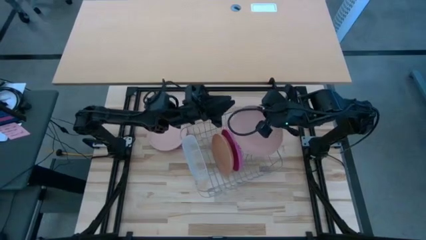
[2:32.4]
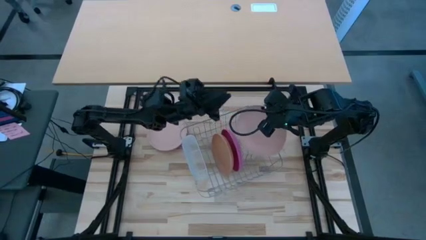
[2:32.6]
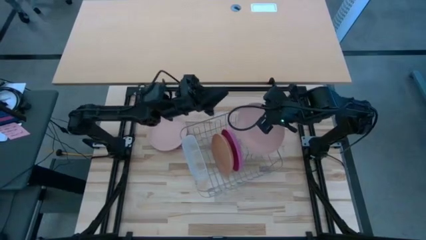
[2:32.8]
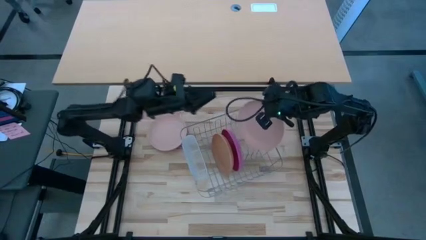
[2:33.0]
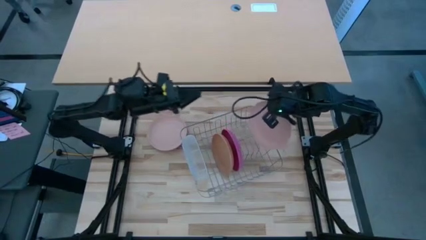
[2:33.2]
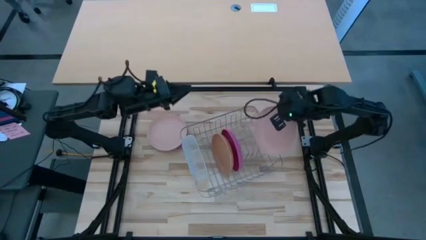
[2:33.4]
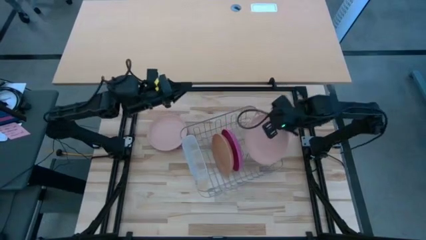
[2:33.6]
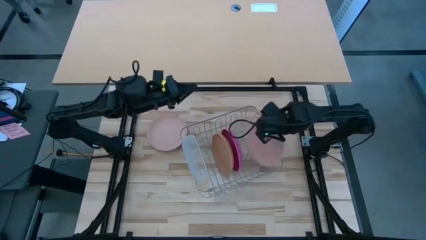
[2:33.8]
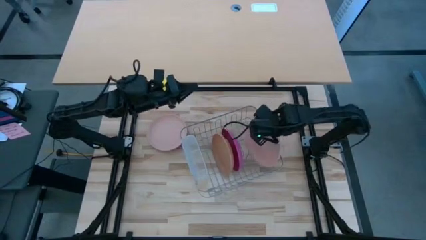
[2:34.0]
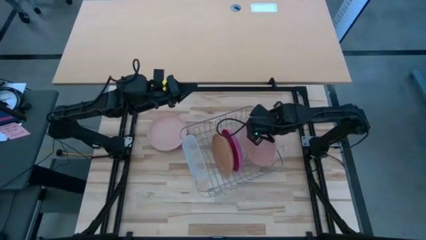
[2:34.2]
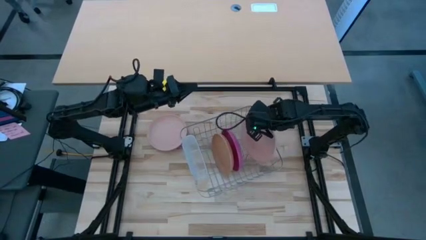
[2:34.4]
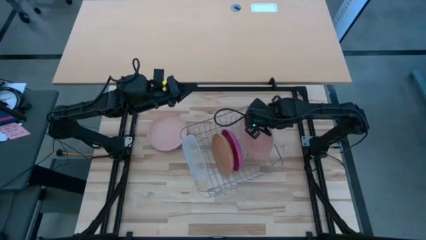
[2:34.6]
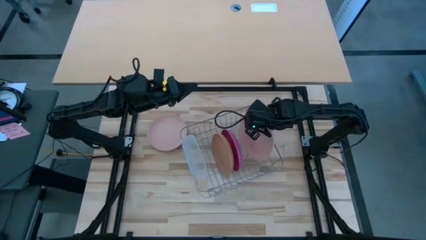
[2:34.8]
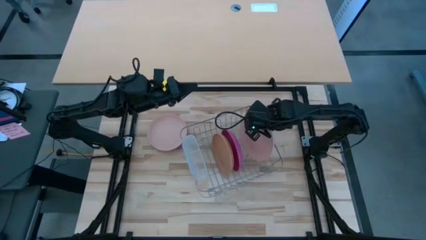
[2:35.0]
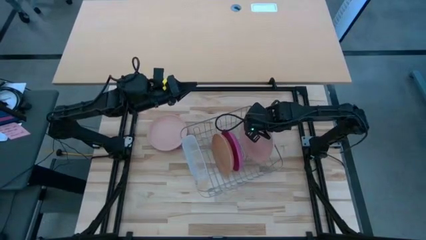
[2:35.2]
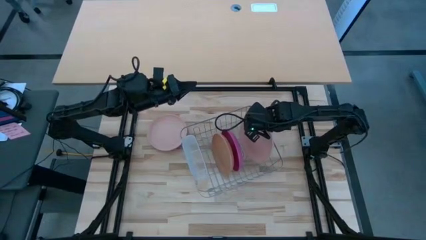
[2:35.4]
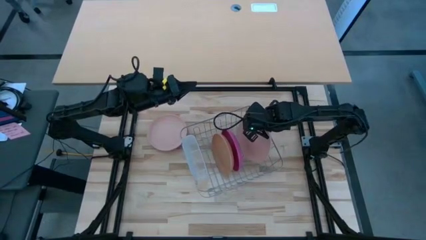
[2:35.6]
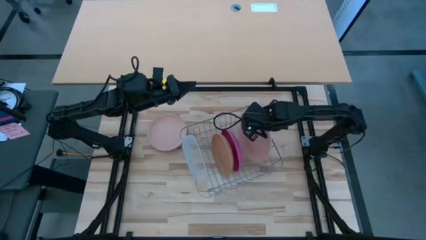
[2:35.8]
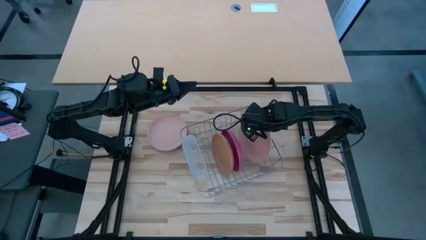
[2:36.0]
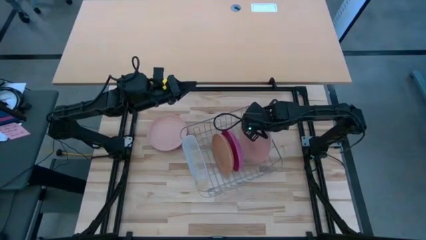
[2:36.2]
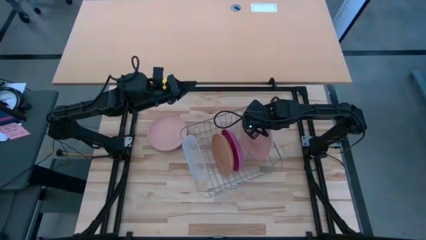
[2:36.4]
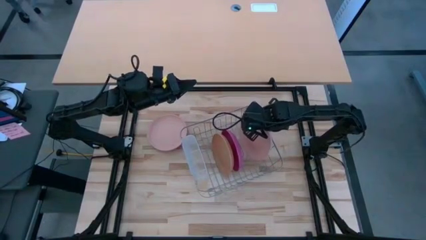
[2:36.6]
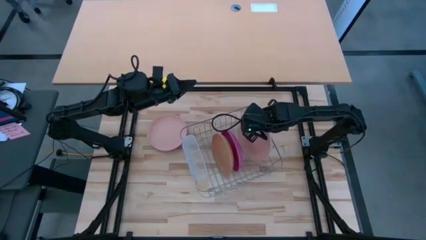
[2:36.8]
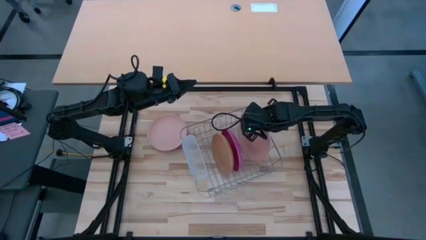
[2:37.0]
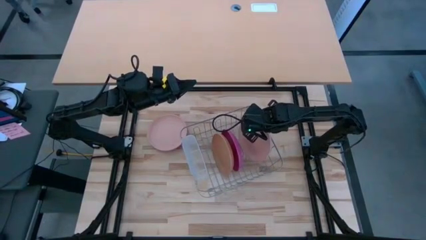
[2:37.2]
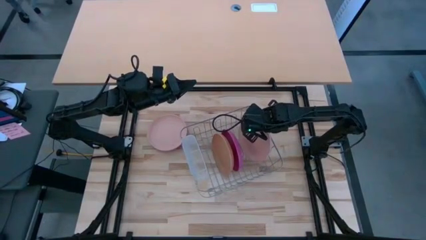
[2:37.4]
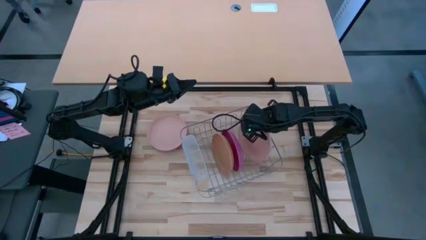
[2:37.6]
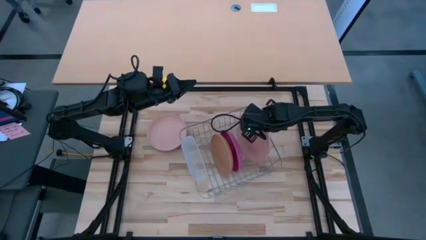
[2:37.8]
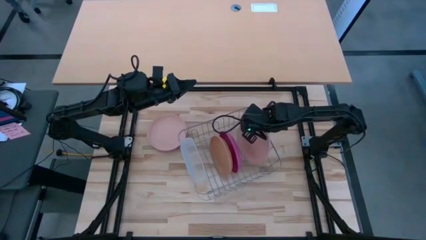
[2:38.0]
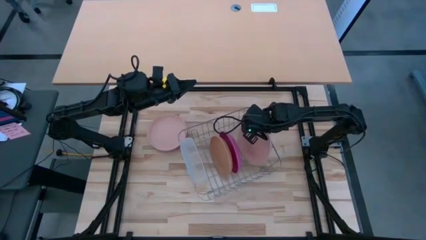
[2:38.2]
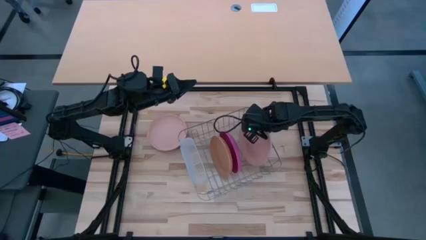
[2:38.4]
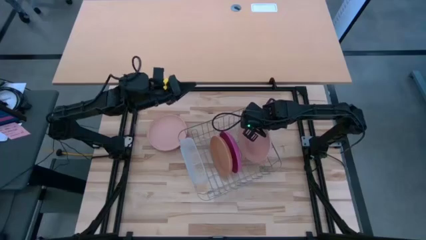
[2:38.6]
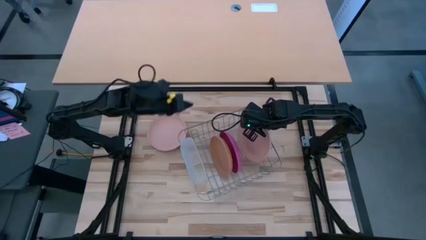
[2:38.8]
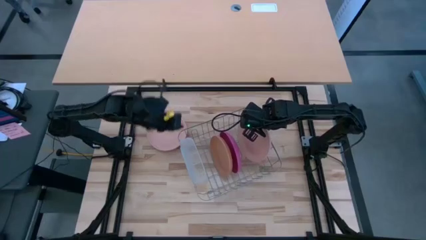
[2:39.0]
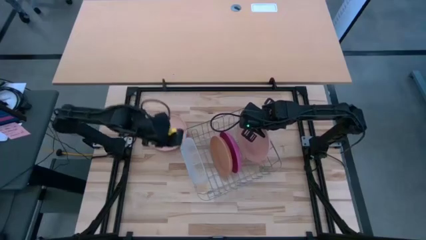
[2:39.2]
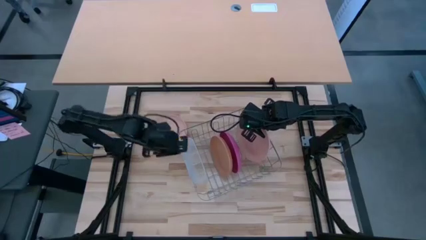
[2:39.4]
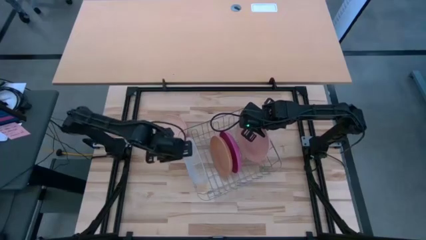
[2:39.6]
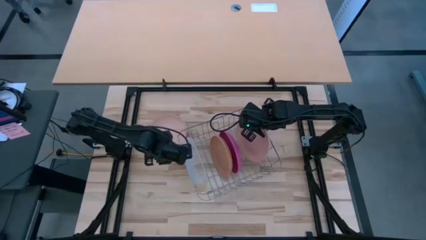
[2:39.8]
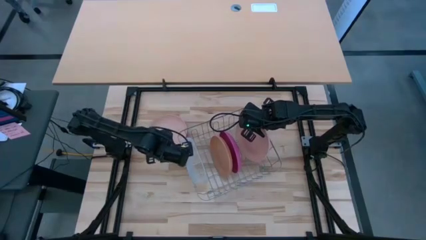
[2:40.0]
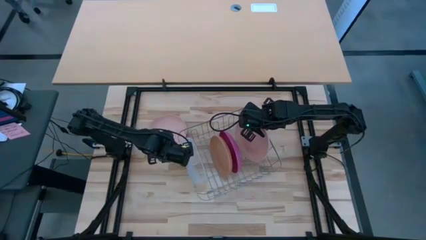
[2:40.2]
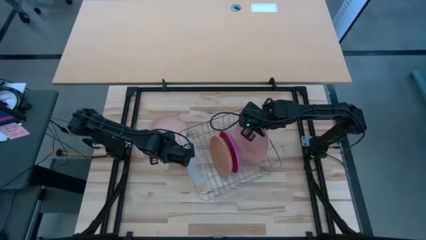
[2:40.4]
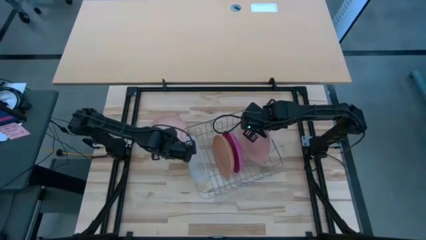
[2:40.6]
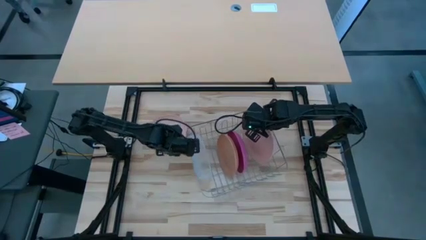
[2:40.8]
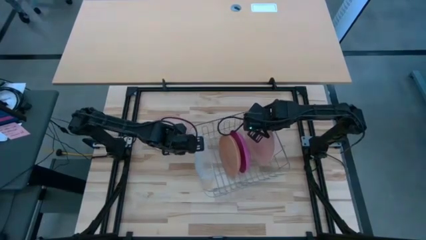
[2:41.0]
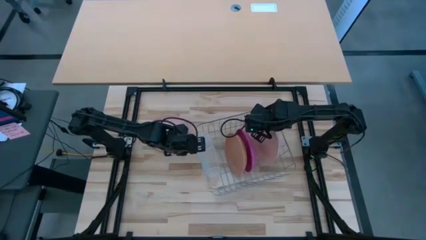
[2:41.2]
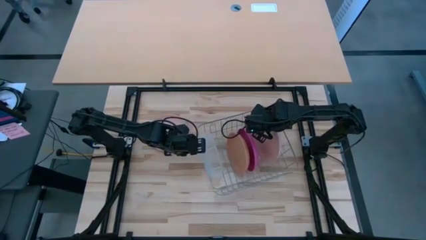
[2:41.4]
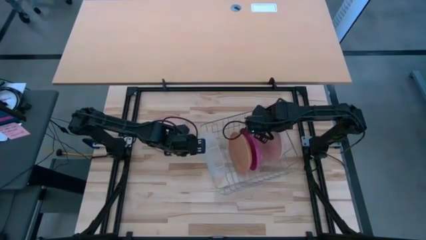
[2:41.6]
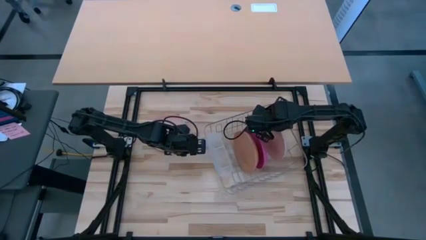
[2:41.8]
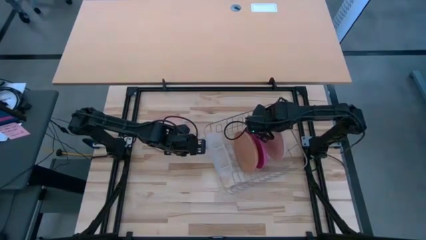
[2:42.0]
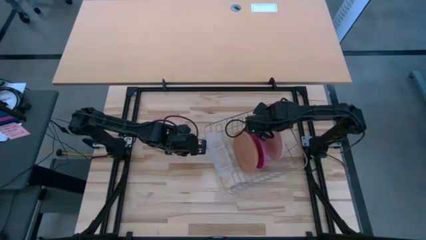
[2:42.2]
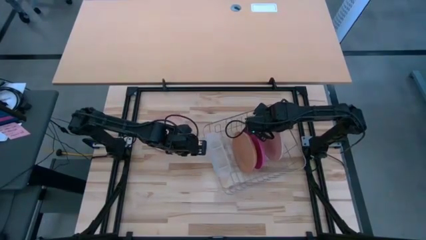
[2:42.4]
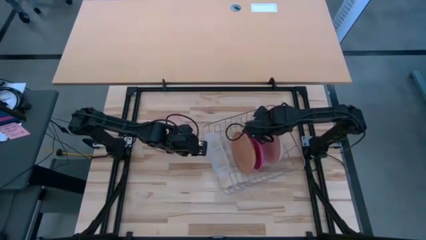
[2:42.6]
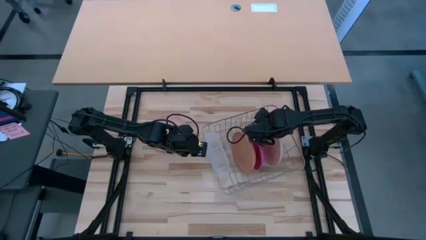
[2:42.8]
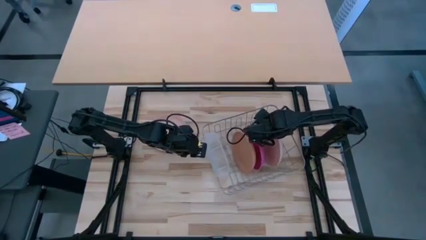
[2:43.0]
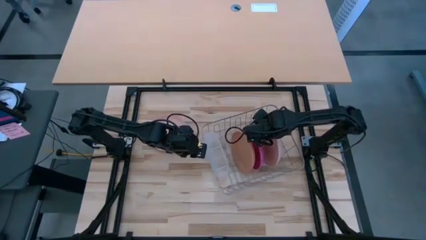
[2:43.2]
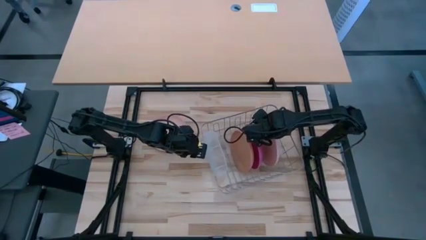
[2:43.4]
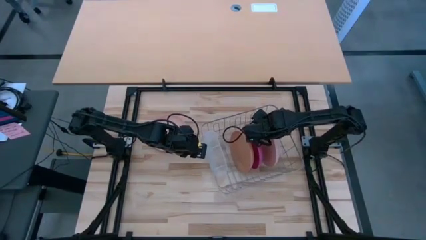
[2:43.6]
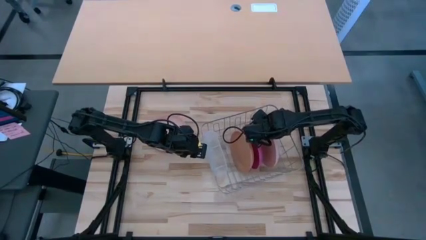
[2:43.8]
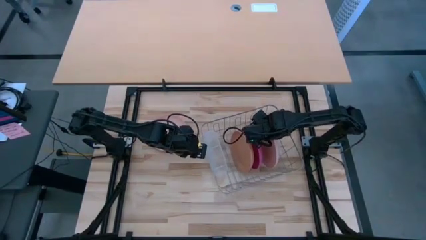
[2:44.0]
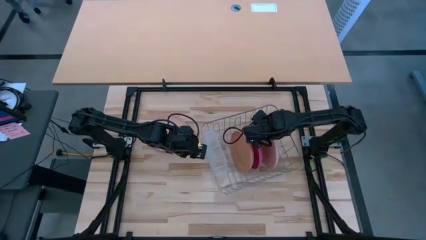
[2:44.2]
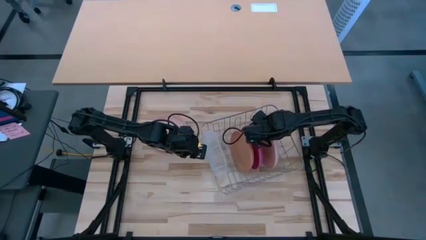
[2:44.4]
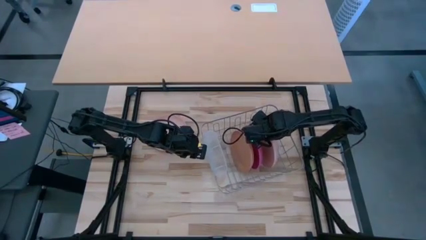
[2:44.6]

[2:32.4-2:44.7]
Task: Sort dishes
Put the top light orange plate in the dish rack

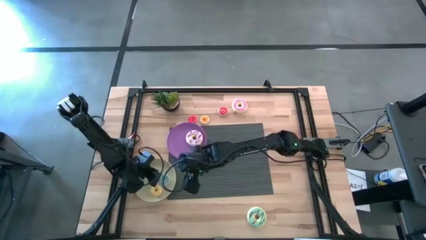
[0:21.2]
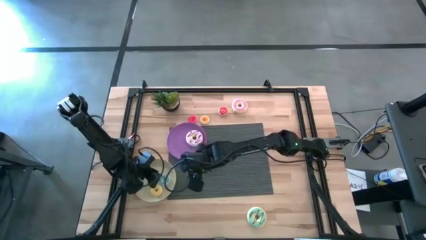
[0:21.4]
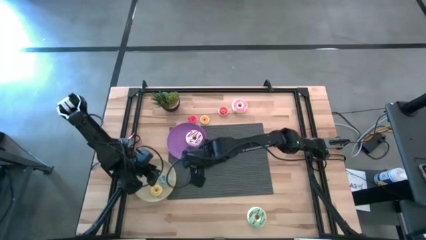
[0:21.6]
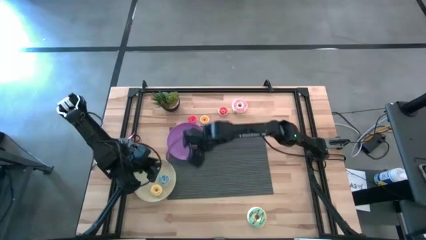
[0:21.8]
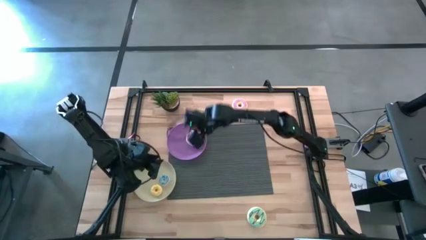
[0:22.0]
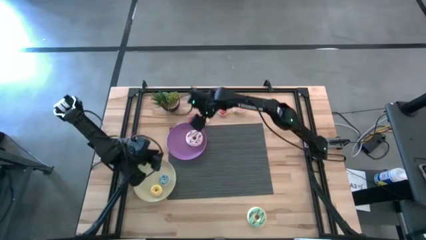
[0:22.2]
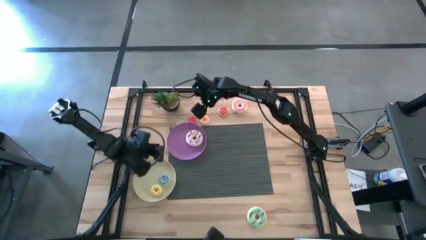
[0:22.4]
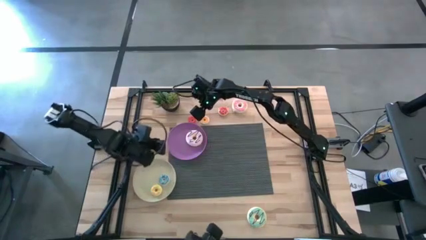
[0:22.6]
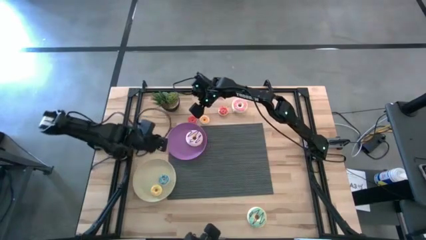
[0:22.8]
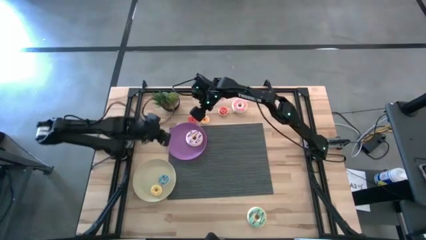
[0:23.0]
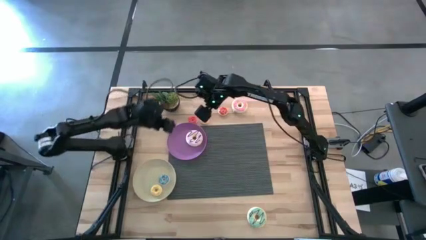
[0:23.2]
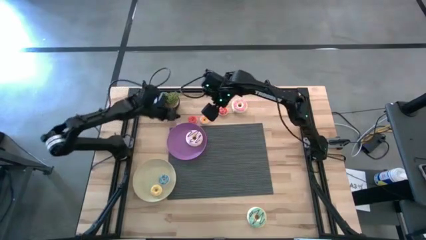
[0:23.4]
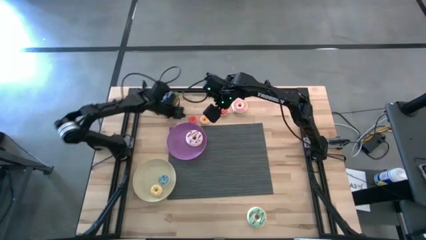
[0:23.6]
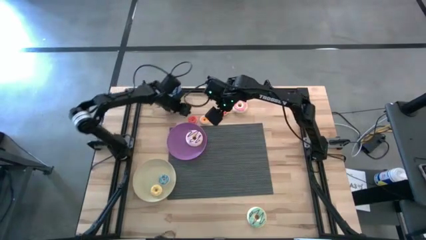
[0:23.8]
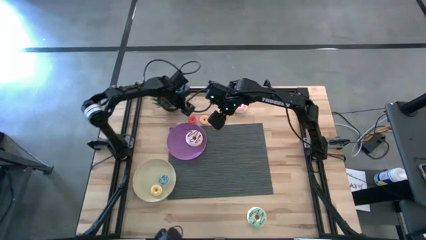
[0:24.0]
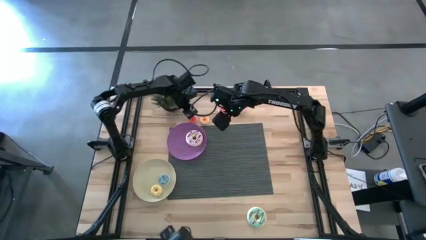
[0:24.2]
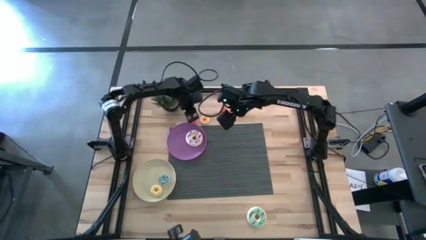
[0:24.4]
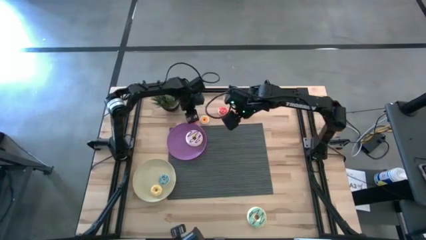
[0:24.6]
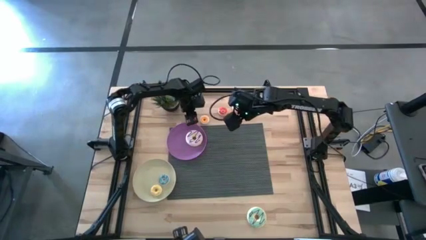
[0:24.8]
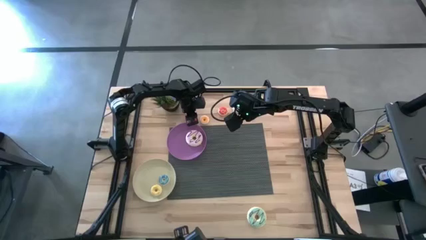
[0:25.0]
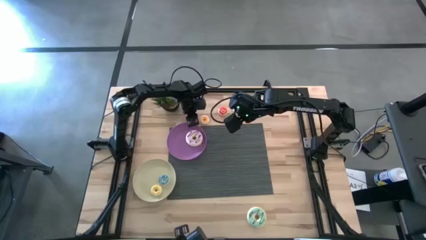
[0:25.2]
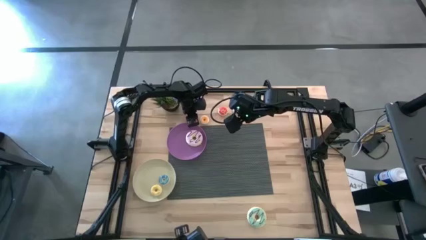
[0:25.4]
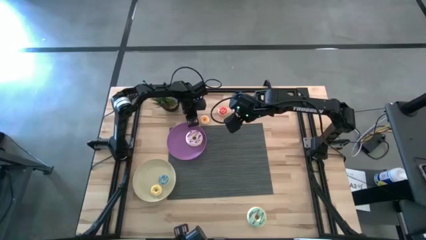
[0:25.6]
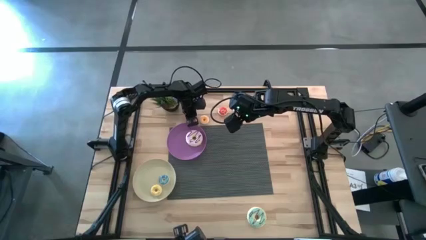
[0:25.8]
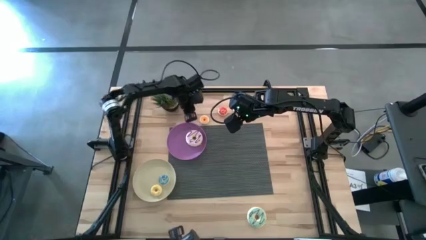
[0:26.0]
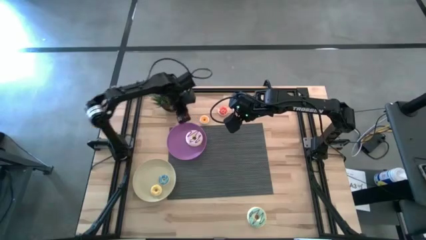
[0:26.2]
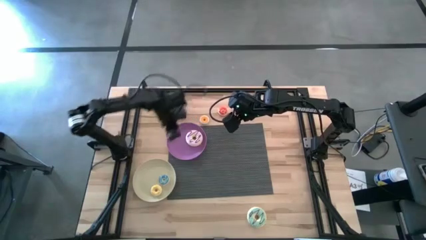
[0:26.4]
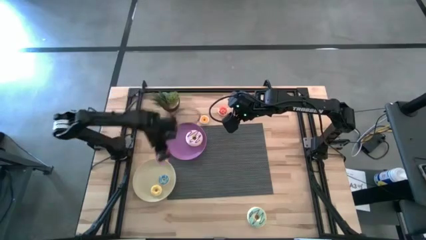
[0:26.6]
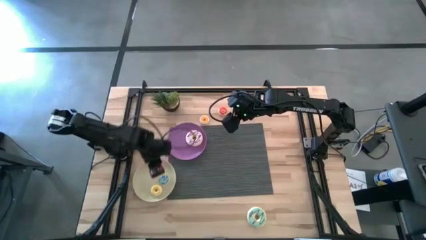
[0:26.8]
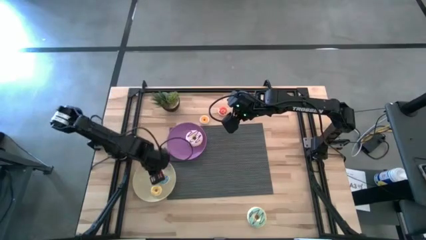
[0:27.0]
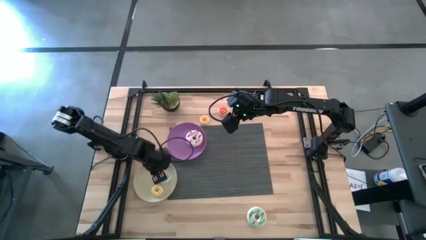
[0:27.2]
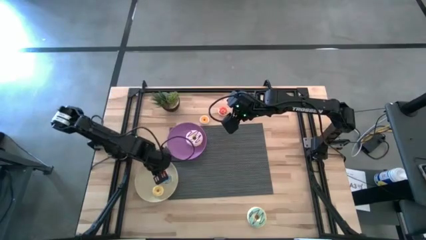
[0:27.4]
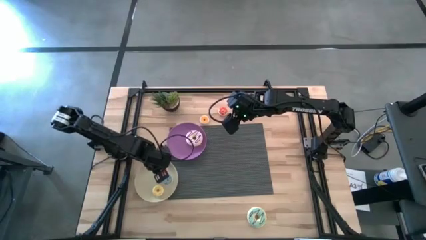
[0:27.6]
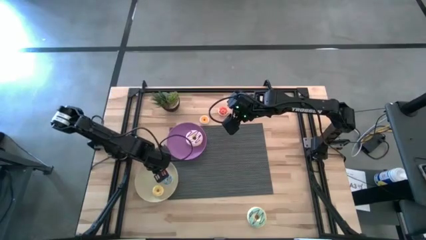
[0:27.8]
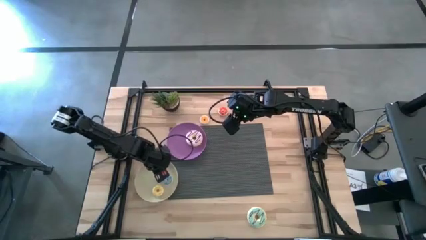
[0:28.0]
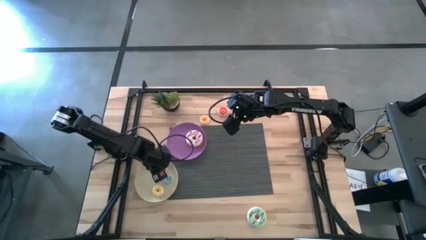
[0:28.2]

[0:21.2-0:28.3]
Task: Pick & Place donuts
Put the left small red donut on the gray plate
